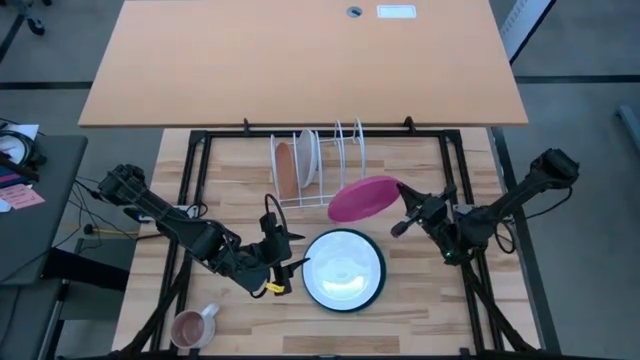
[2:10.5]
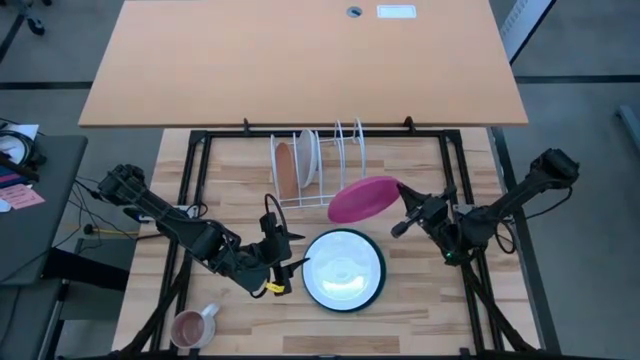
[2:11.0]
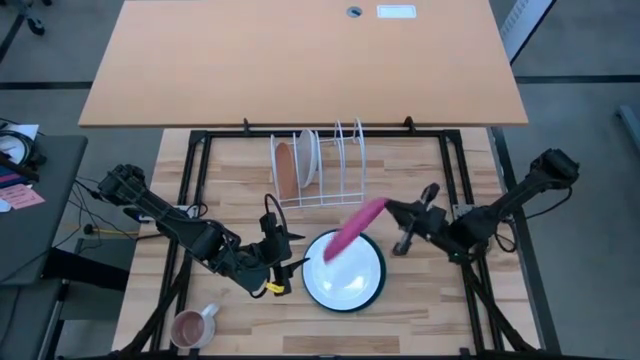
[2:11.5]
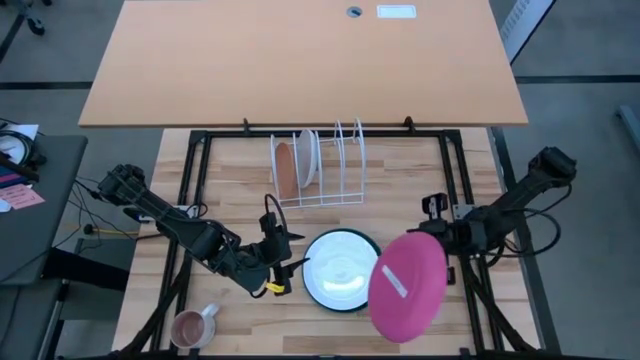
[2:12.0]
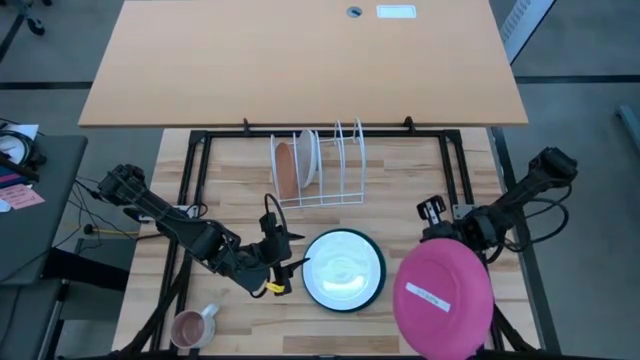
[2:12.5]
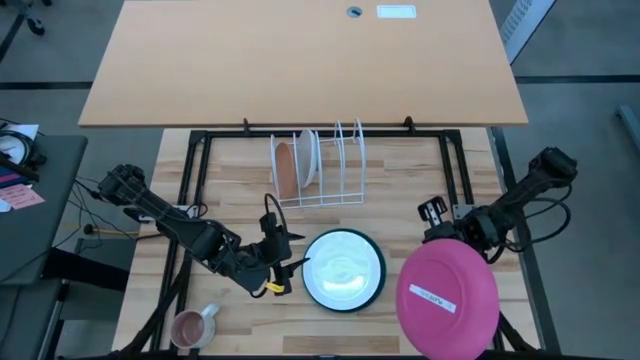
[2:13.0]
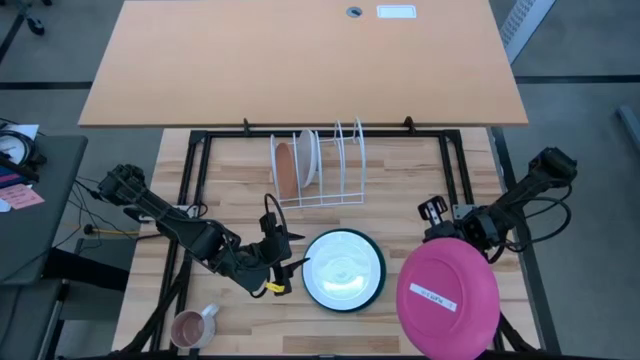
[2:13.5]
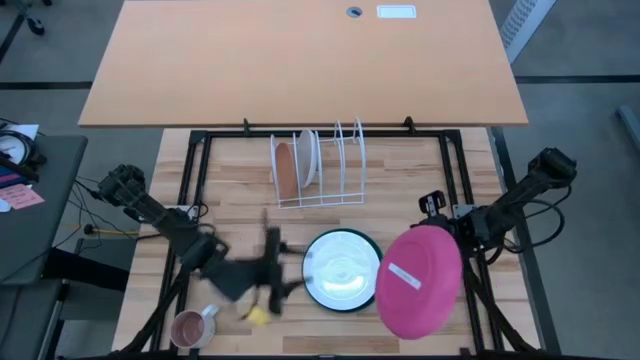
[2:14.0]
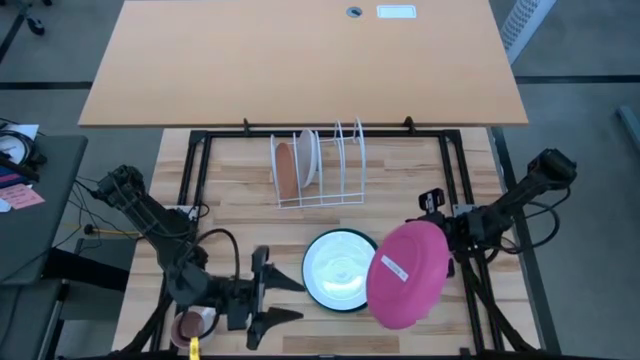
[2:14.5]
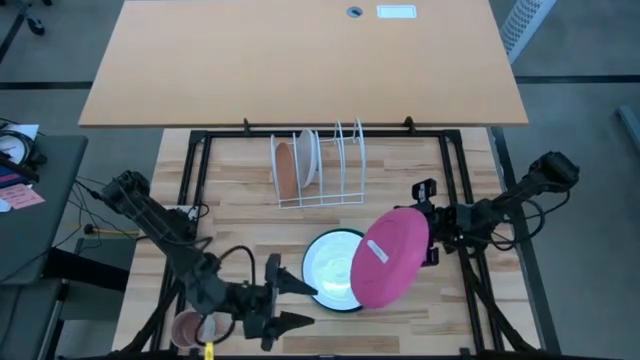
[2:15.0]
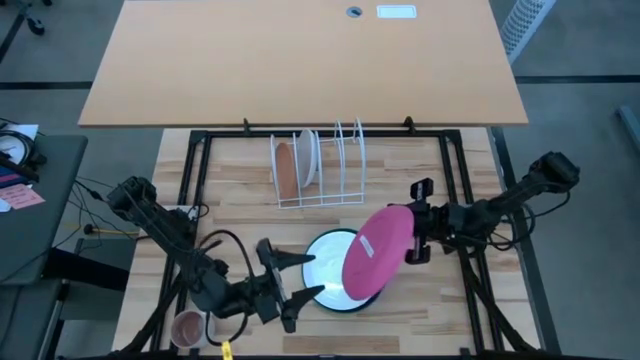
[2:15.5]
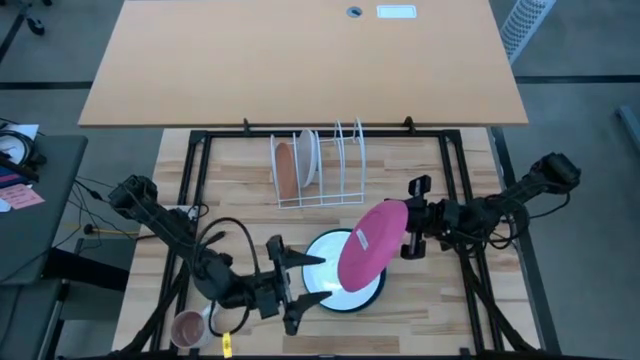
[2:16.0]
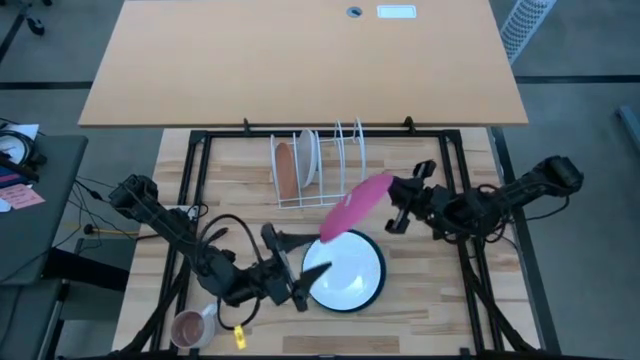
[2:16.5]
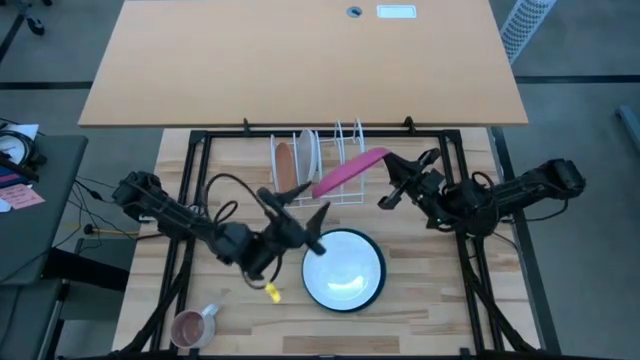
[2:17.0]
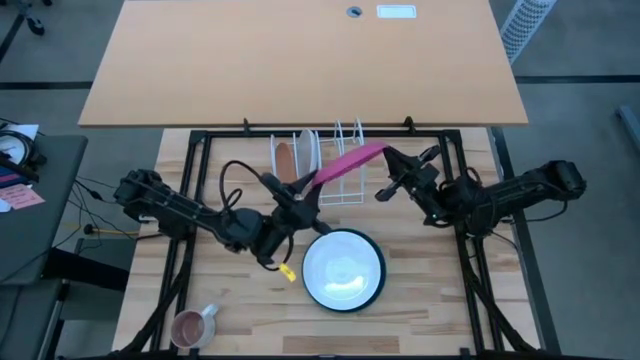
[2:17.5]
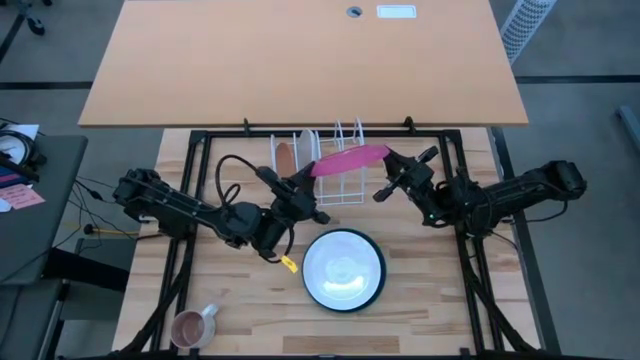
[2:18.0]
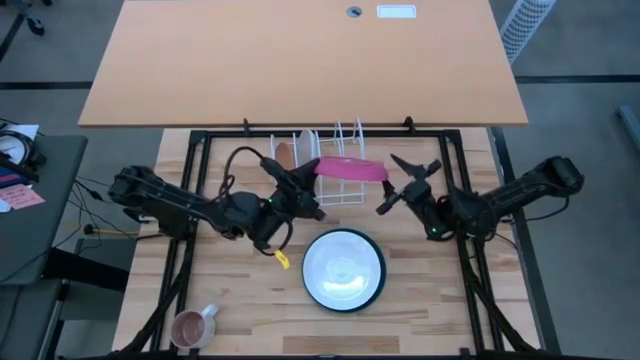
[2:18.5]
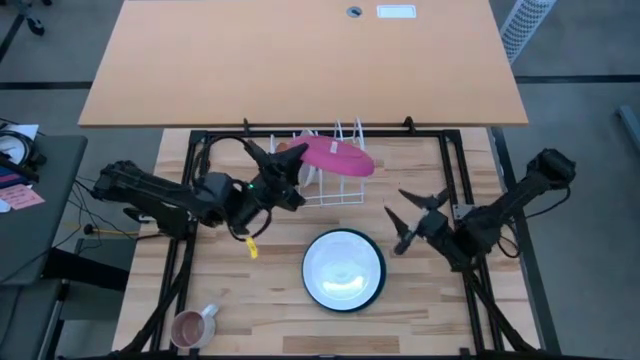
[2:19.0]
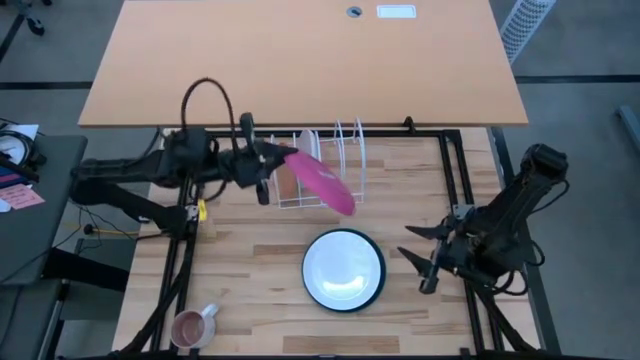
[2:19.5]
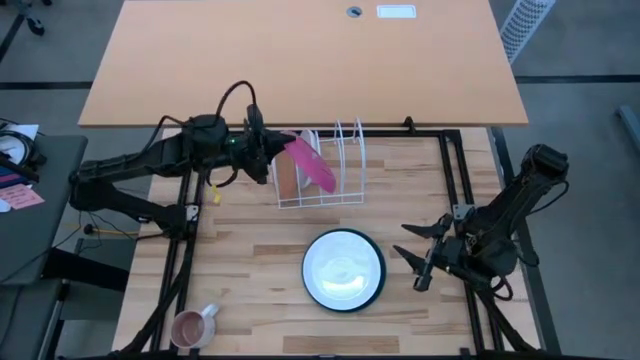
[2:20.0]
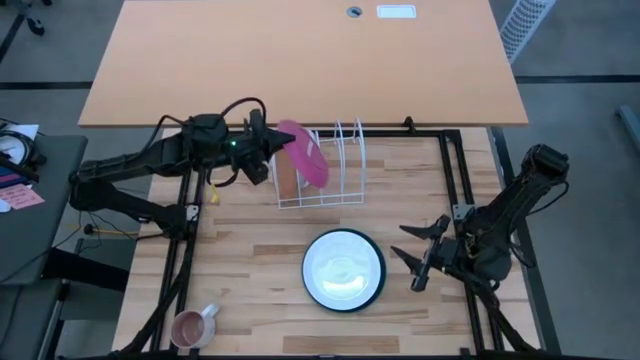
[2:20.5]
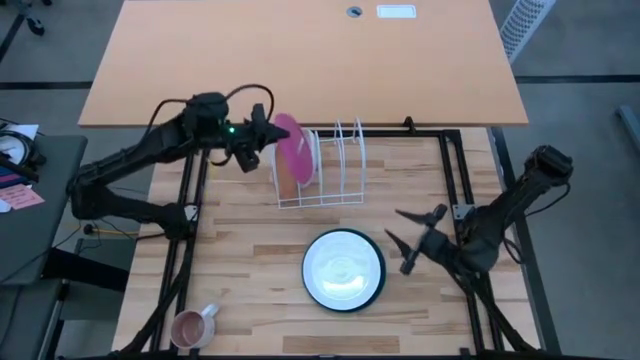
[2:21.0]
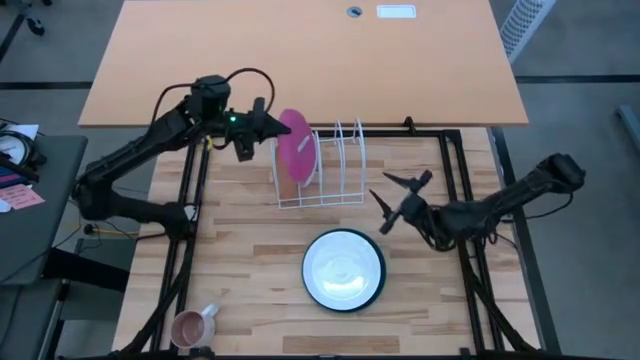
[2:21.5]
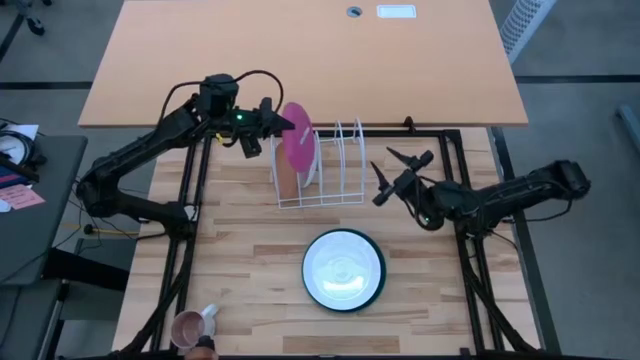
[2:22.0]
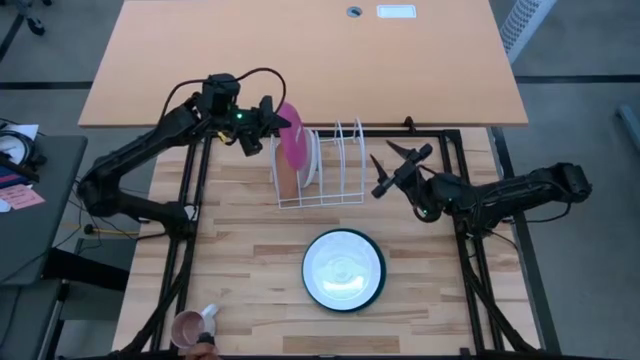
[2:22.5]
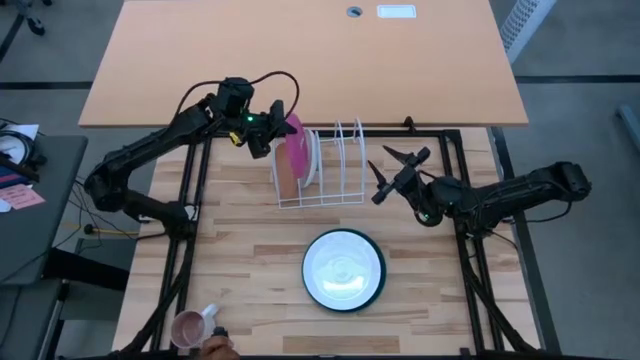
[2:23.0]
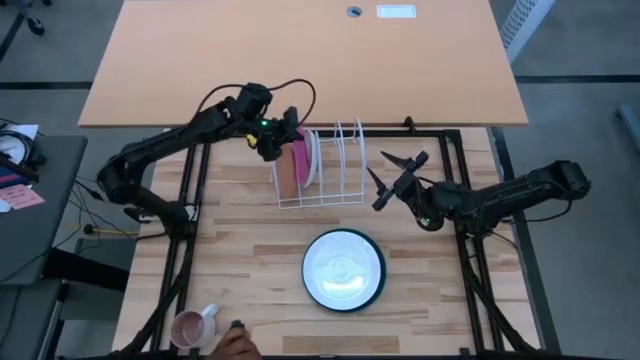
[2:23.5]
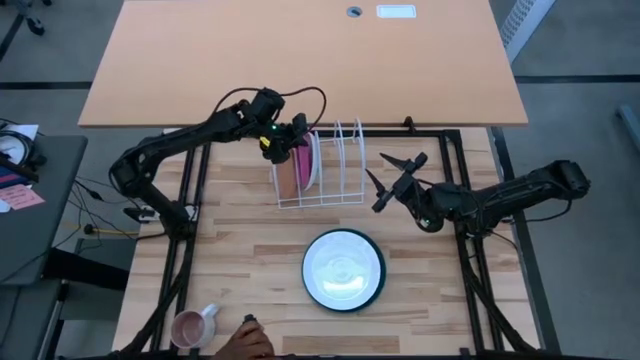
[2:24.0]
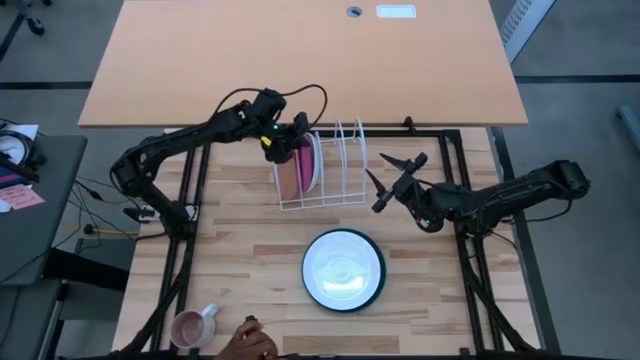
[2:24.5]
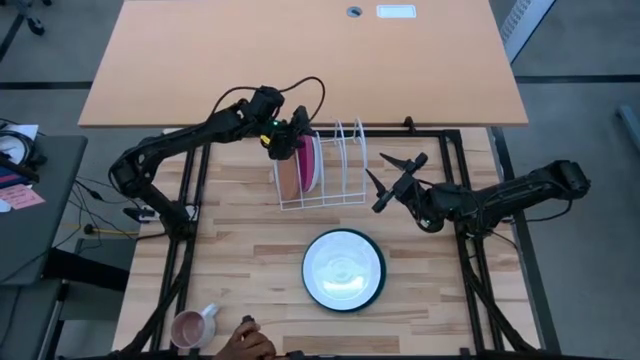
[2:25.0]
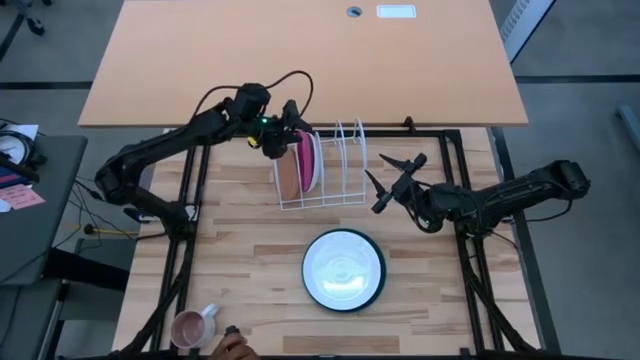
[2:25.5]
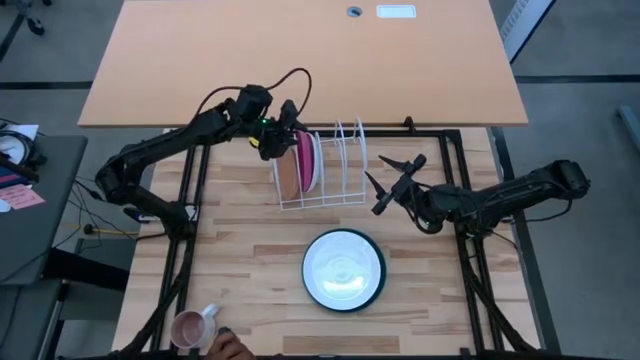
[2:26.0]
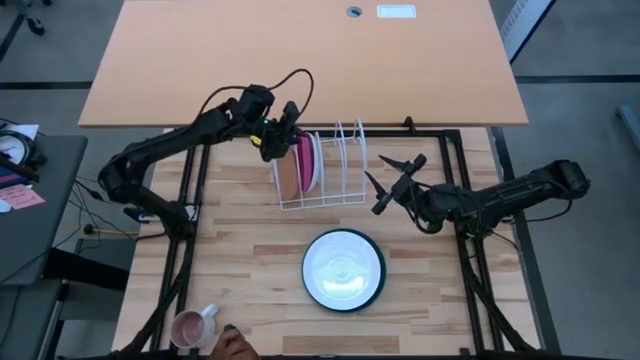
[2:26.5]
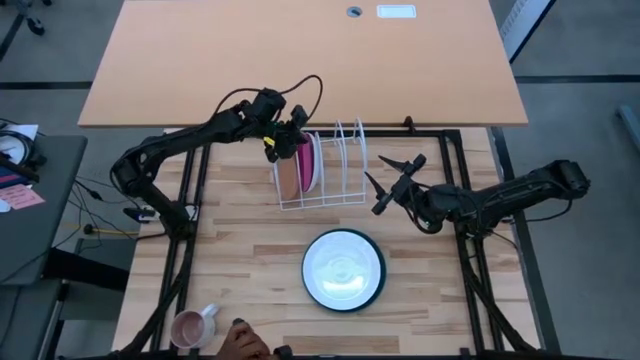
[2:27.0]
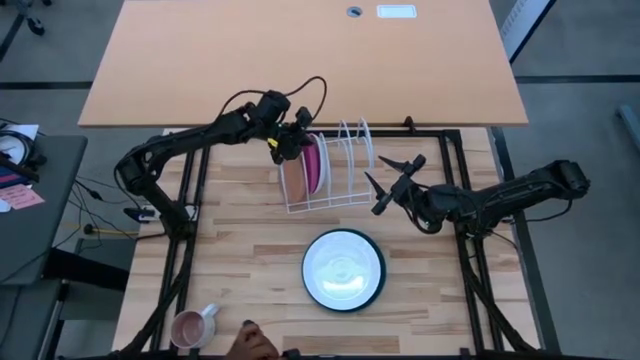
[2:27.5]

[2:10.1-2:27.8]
Task: Sort dishes
Put the pink plate in the dish rack

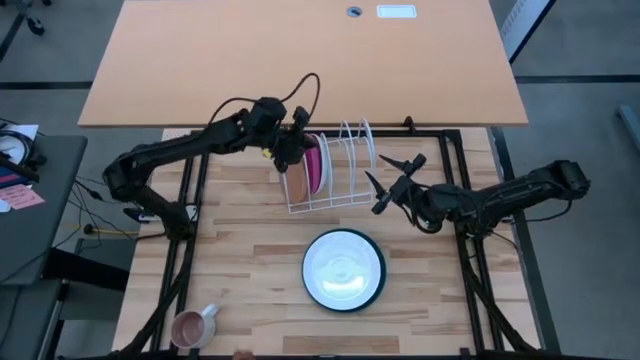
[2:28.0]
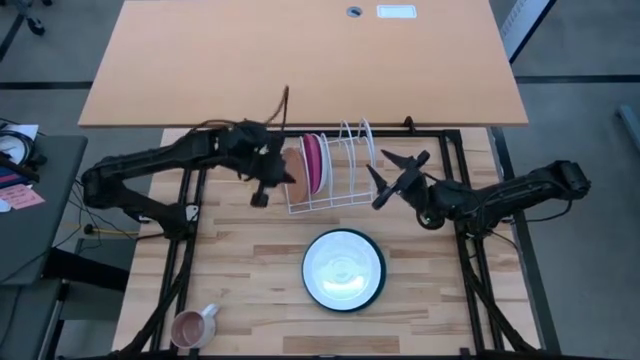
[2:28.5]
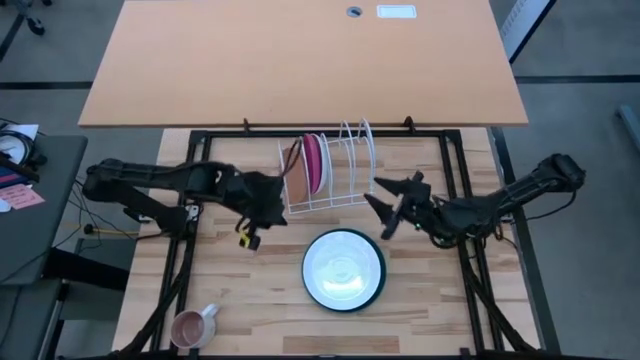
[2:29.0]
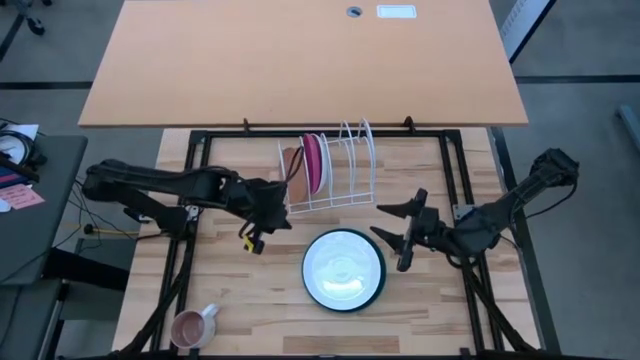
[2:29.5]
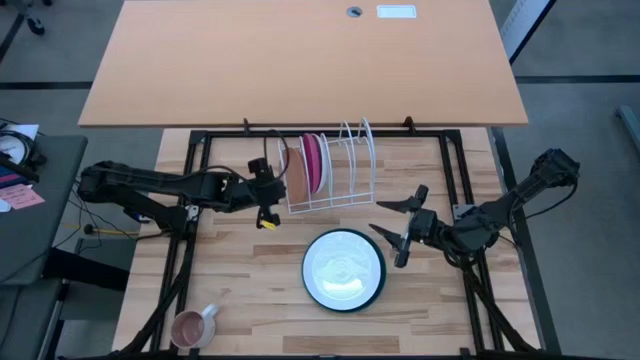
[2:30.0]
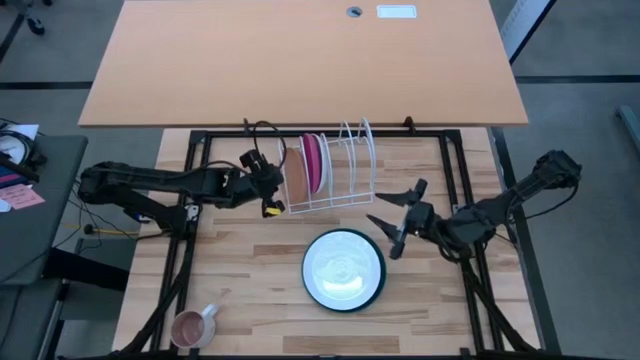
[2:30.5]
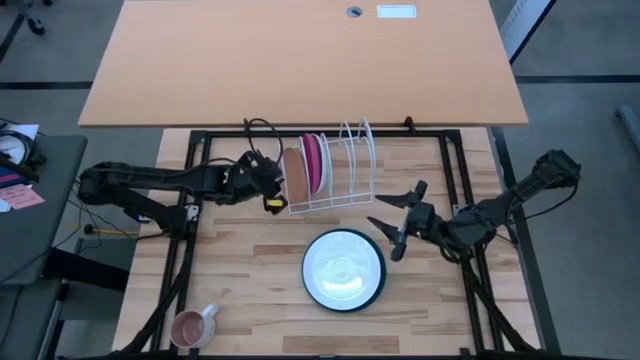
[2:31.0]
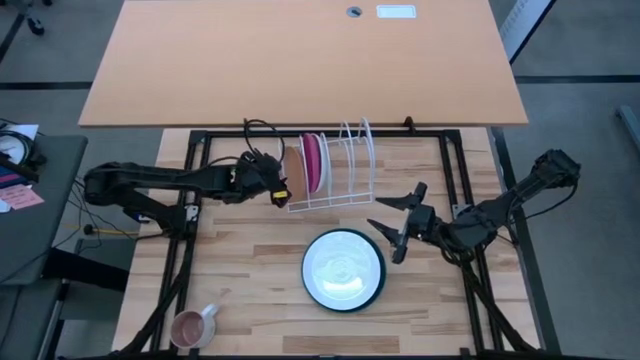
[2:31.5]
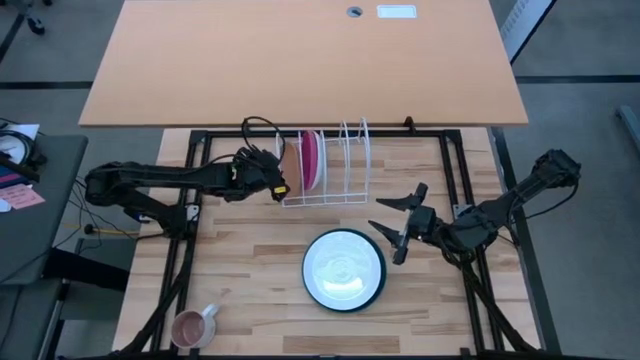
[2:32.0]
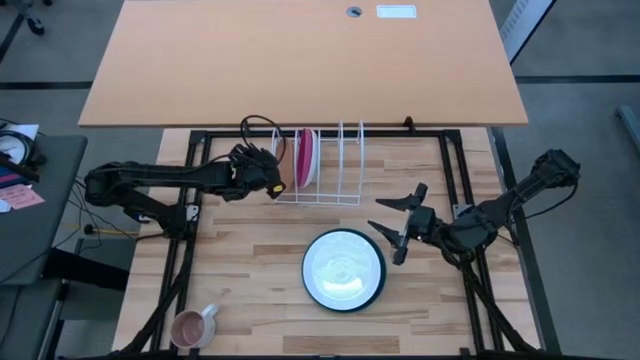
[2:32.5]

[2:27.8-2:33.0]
Adjust the dish rack
